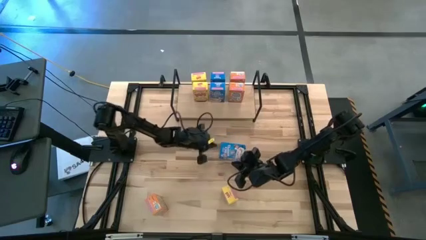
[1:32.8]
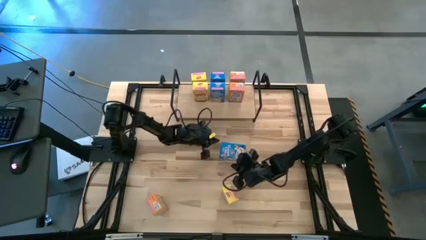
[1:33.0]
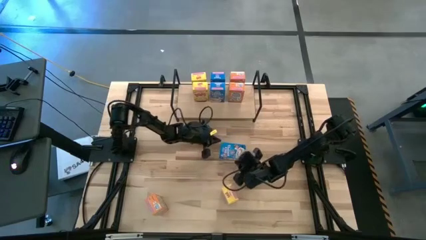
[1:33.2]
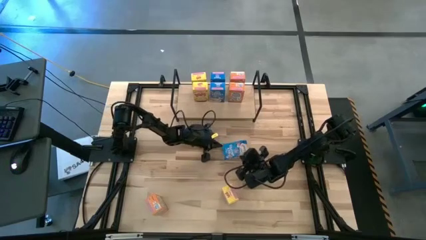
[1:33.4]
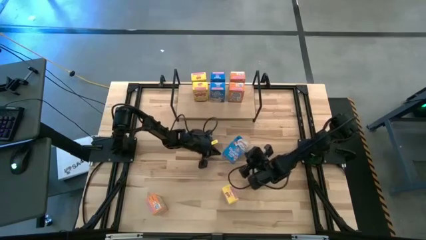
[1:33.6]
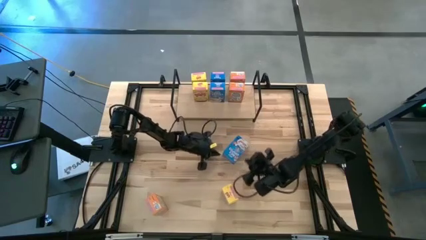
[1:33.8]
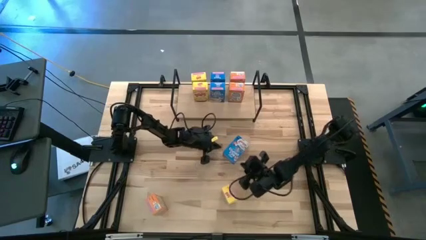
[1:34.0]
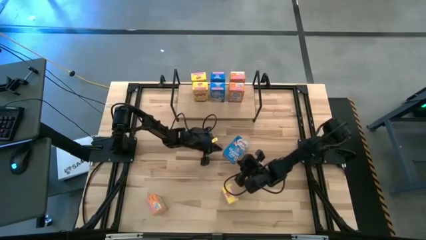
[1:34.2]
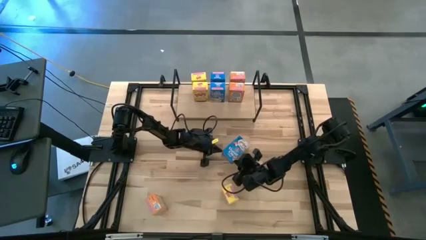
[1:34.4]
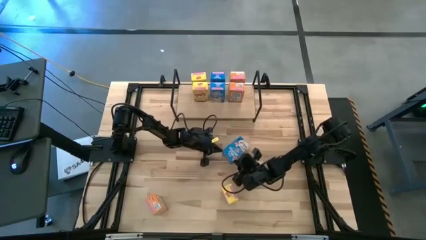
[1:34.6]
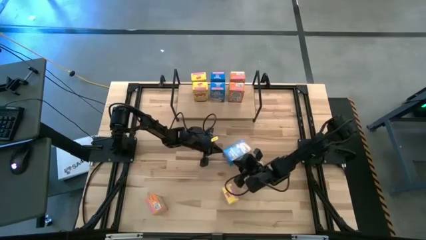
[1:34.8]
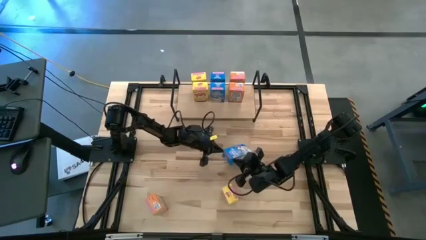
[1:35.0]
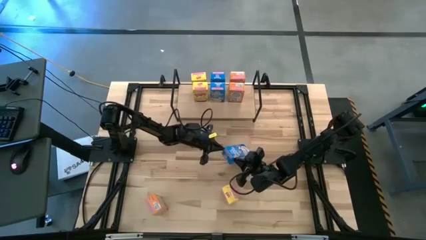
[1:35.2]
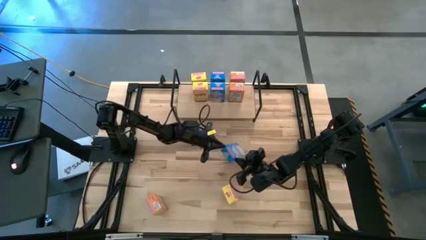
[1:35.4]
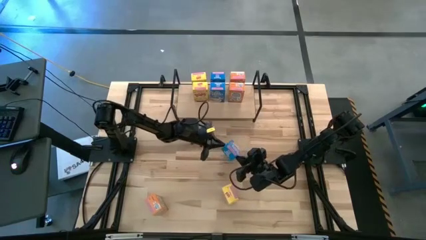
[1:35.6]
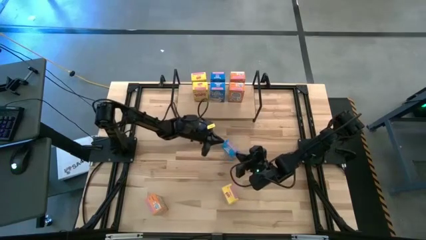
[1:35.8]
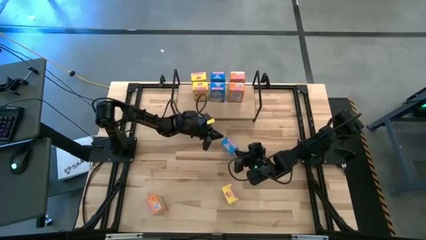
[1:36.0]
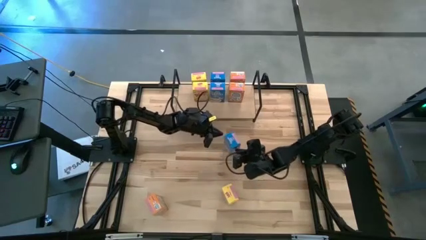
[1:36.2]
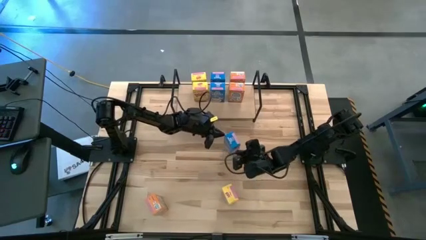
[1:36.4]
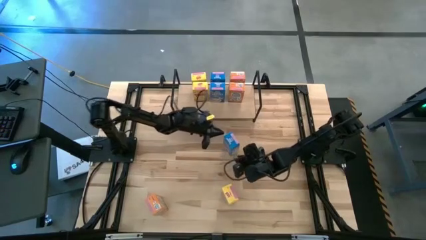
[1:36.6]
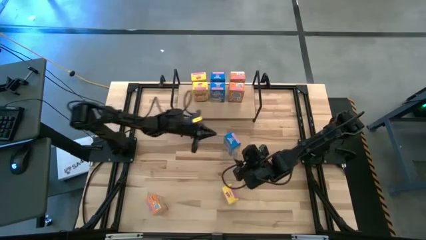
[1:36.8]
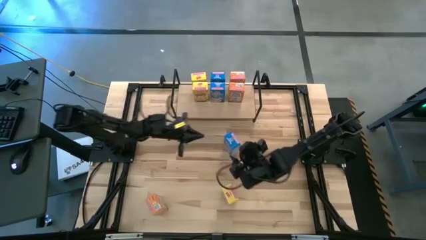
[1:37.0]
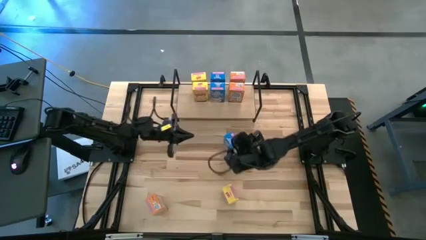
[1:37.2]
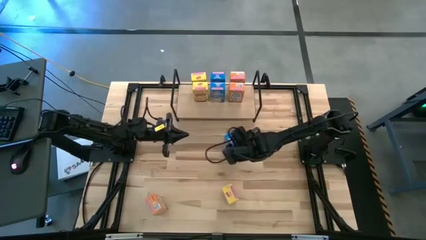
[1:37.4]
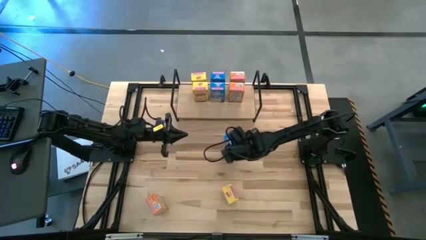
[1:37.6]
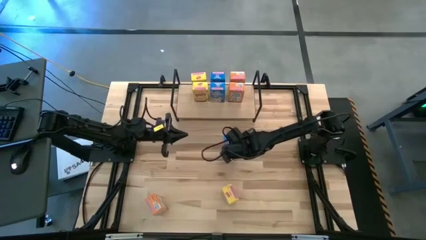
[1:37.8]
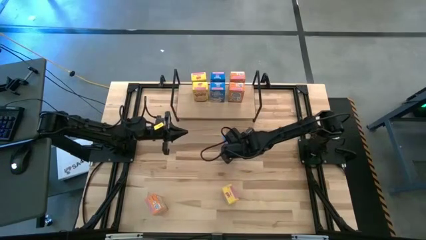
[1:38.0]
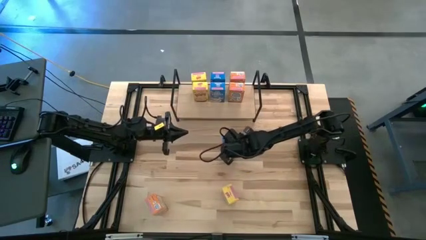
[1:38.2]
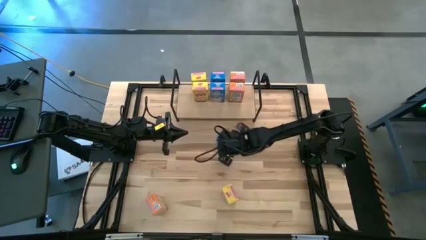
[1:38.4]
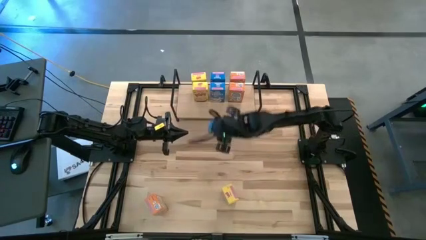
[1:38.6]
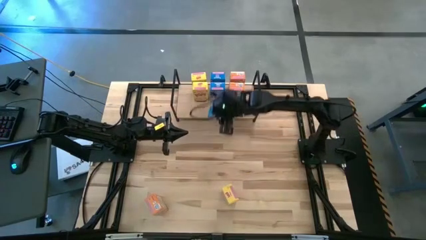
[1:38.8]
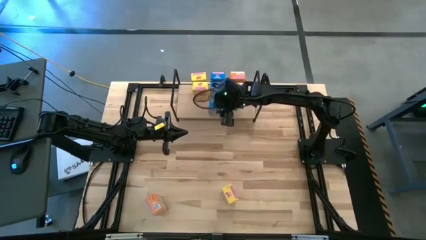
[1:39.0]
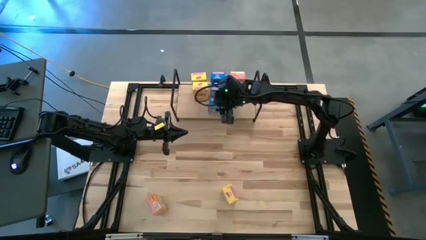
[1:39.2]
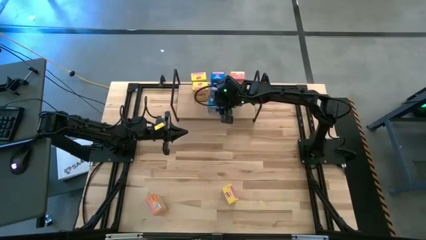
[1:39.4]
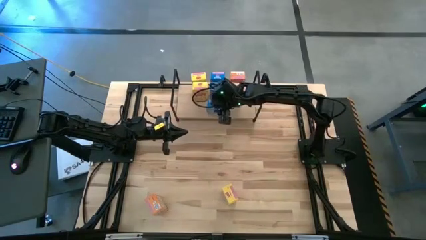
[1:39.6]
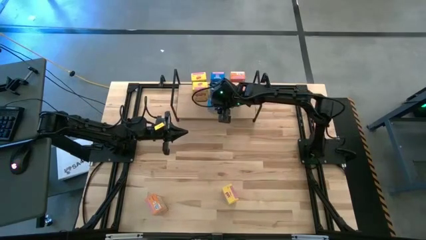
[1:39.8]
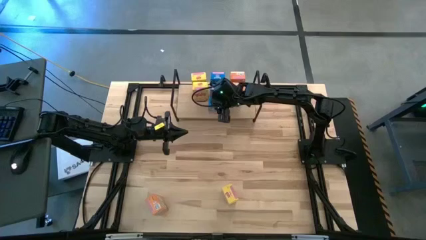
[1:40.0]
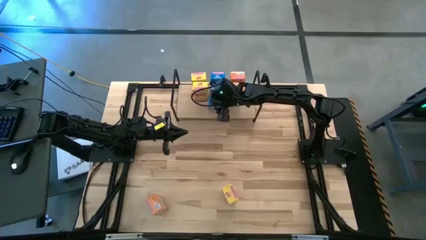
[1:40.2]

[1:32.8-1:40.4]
Task: Stack cereal on shelf
Put the blue cereal box on the shelf aligned with the other blue cereal boxes

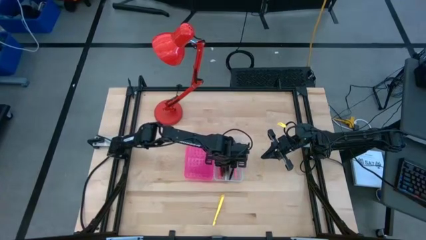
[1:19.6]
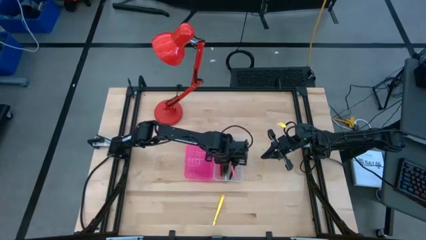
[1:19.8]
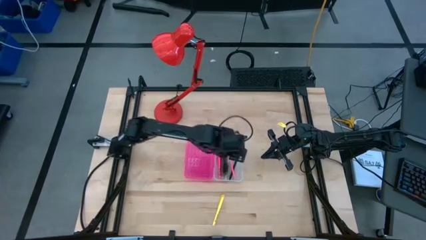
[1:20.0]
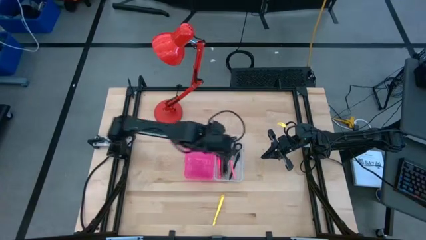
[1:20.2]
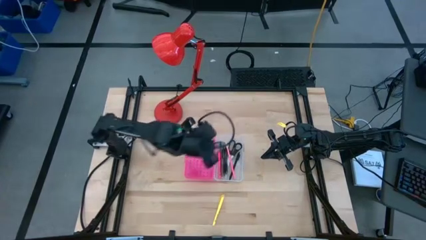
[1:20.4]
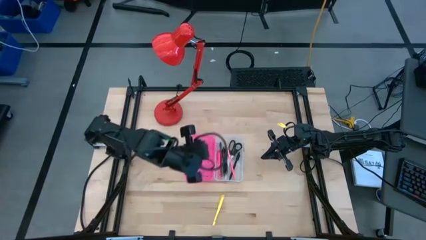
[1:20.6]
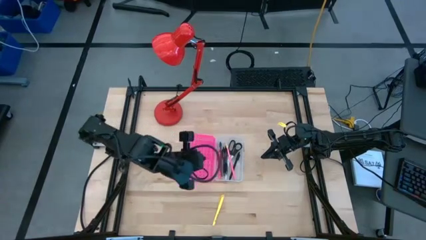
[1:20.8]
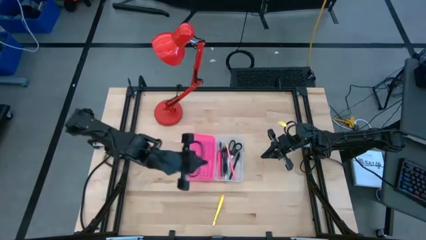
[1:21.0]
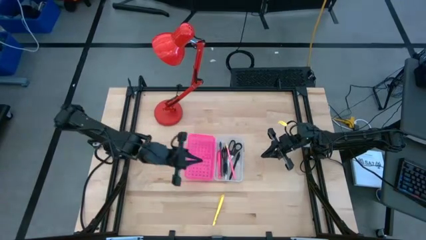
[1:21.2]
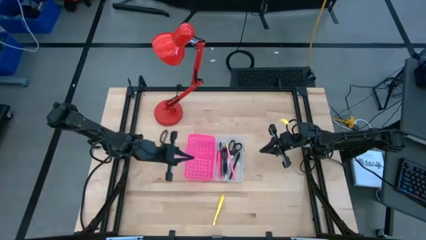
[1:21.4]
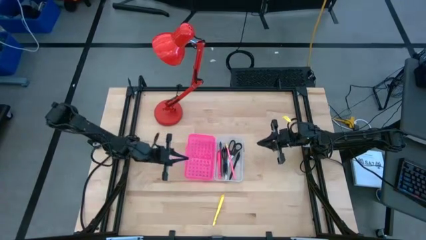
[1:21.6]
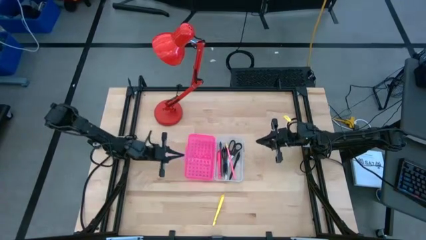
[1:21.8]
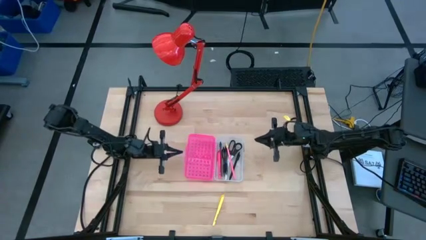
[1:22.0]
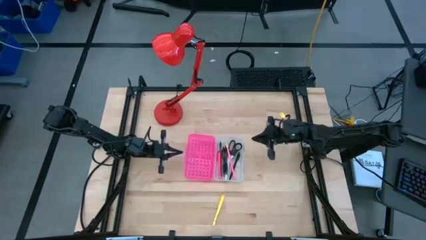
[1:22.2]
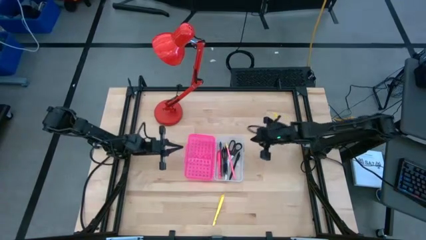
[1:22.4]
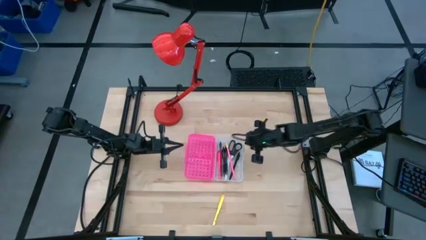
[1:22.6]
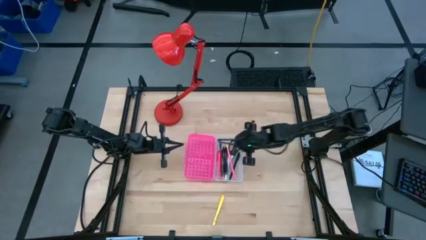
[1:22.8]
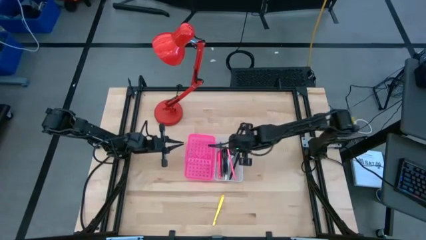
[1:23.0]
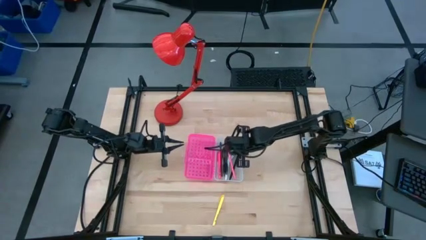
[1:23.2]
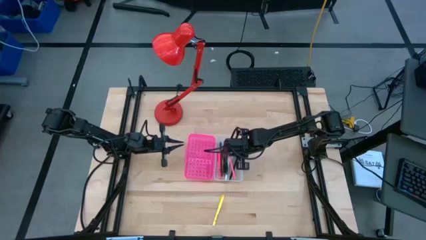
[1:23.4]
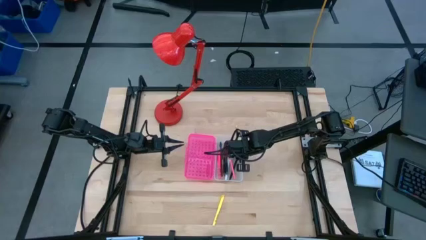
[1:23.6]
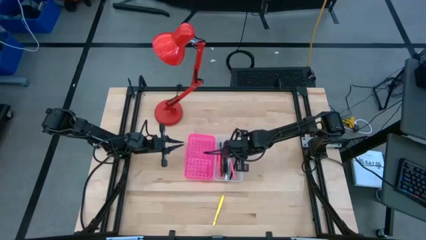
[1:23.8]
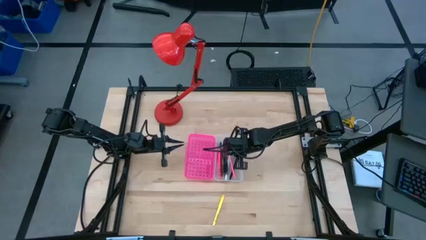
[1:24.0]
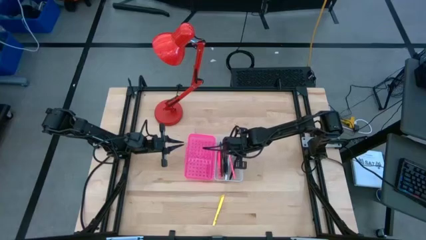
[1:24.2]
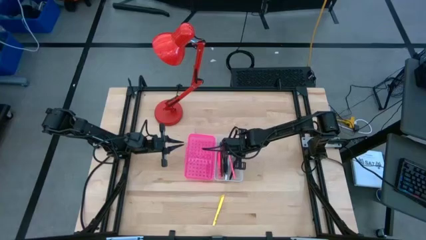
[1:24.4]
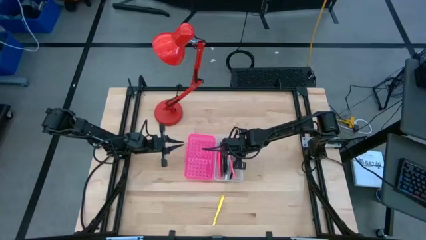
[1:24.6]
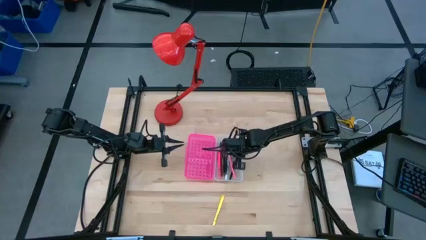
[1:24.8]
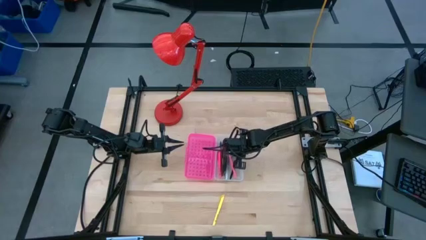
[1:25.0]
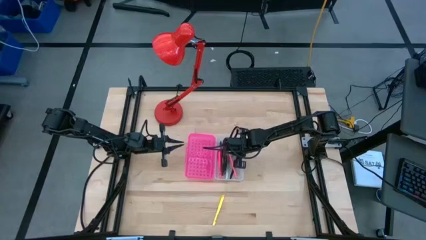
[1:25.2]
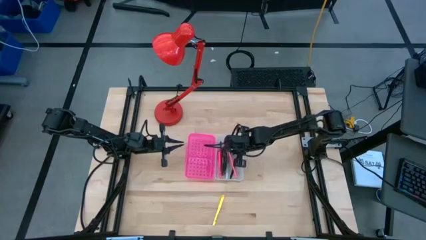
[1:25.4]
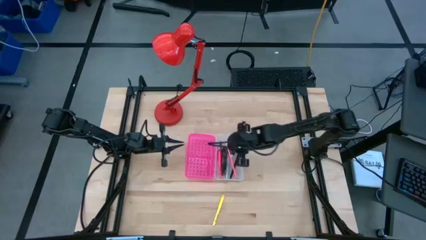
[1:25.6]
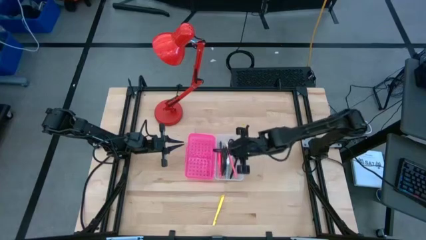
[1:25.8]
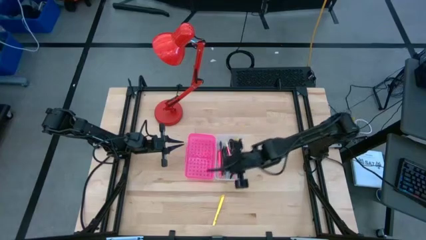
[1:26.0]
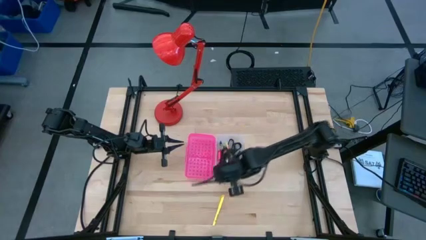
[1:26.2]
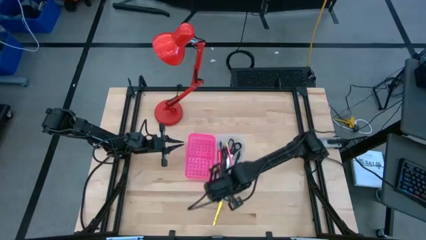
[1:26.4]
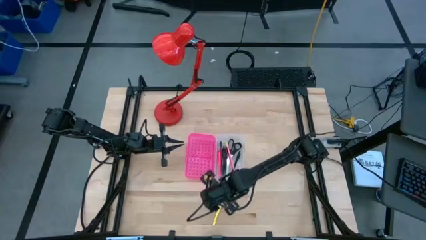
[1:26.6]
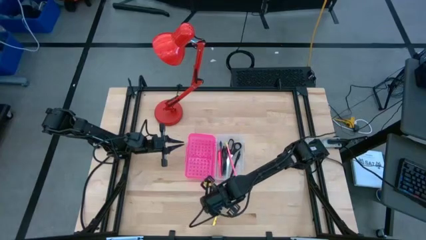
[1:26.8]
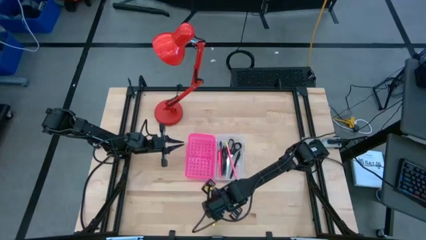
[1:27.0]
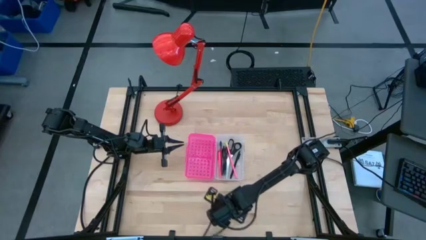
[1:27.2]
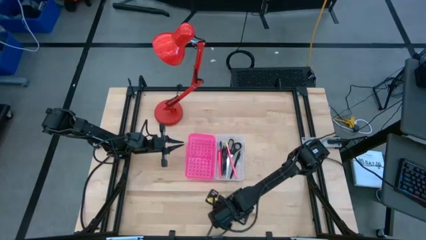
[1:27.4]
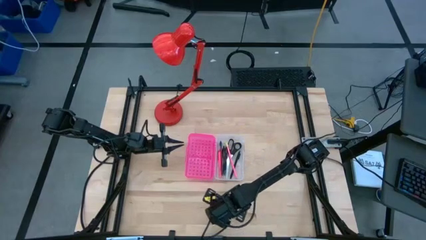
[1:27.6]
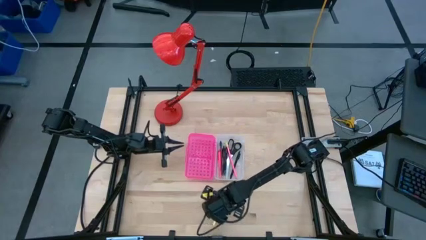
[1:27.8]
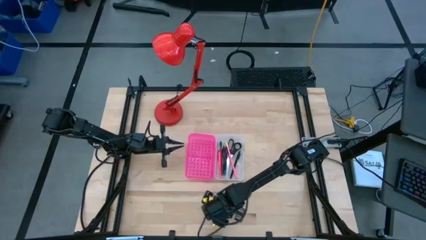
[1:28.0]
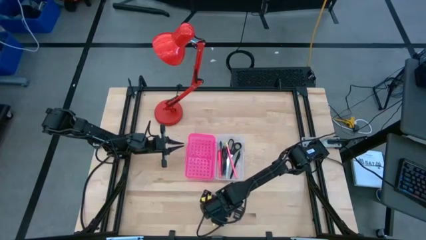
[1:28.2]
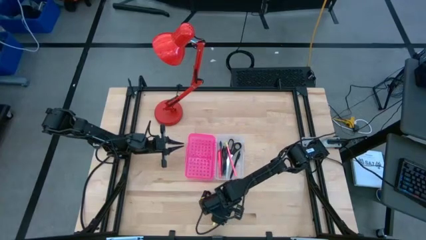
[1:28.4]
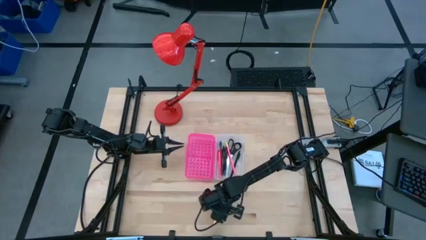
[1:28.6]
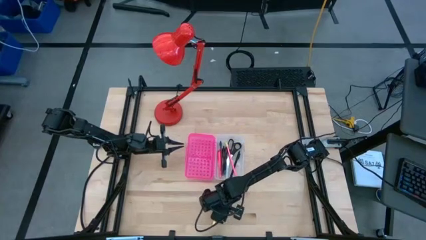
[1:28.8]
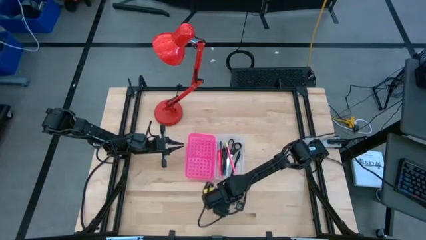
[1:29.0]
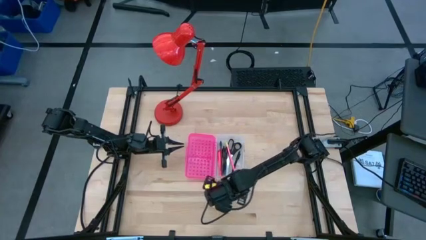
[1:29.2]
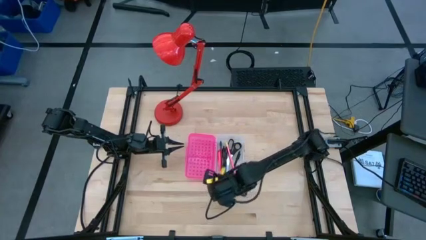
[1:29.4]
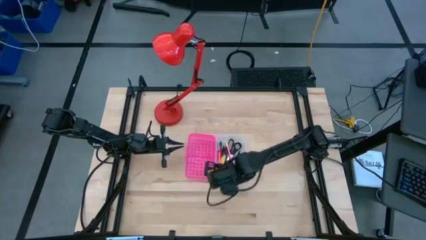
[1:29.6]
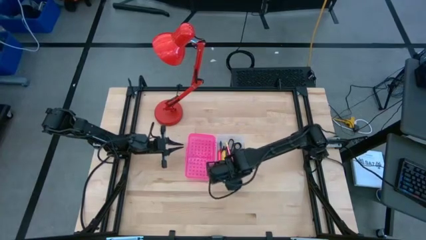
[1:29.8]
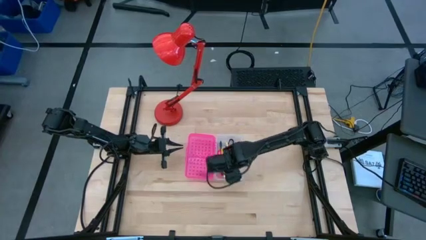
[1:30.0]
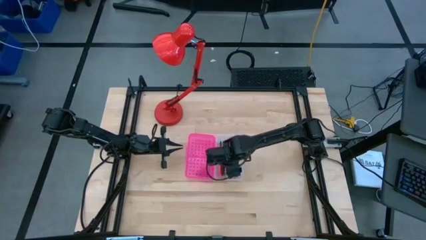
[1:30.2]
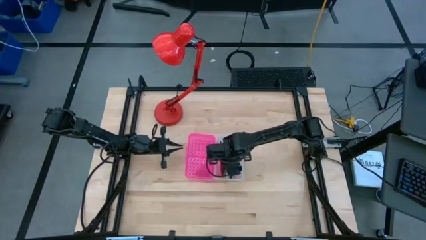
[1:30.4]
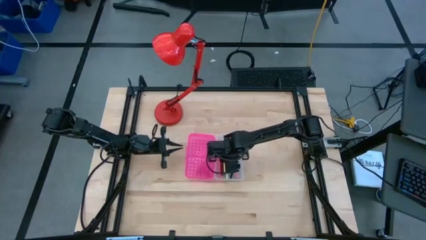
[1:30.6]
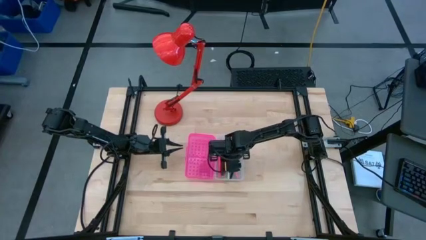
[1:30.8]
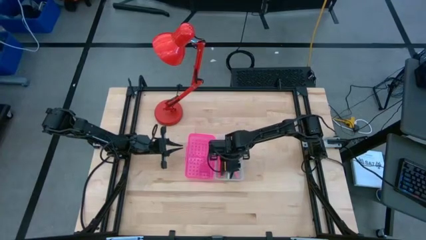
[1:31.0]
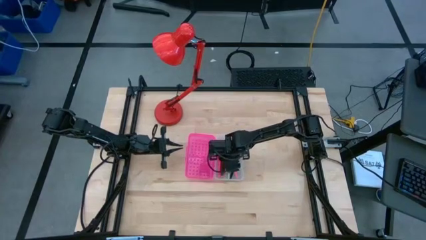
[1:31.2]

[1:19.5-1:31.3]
Task: Pick & place school supplies into a supply box
Put the yellow pen in the pink box
